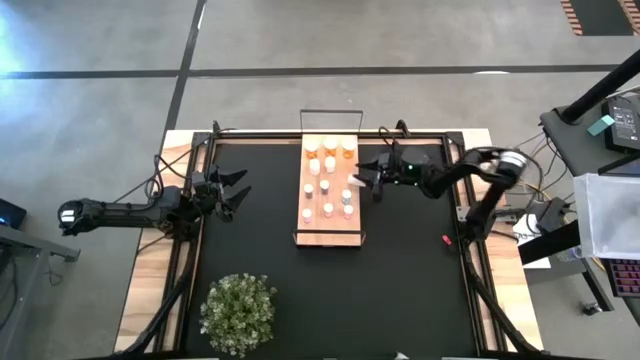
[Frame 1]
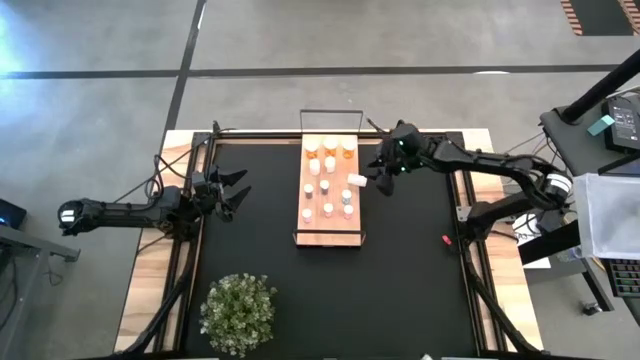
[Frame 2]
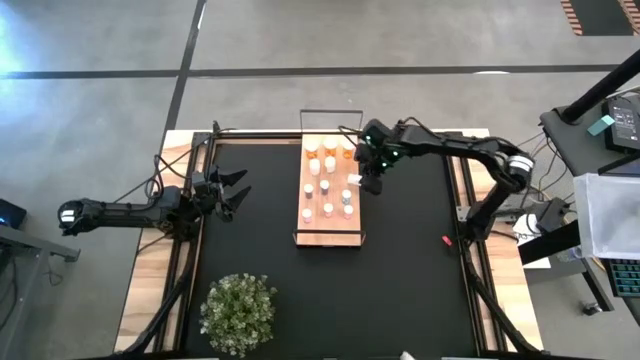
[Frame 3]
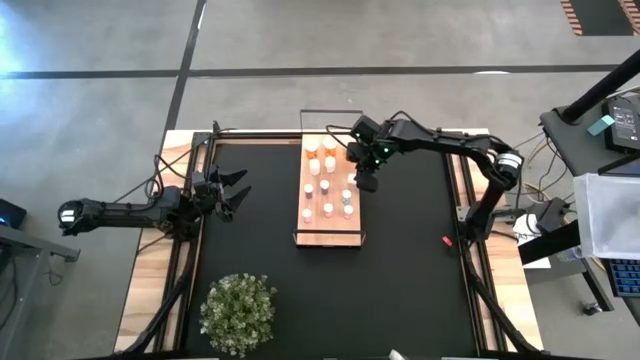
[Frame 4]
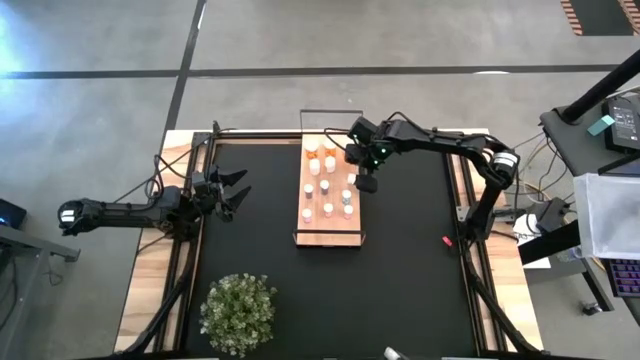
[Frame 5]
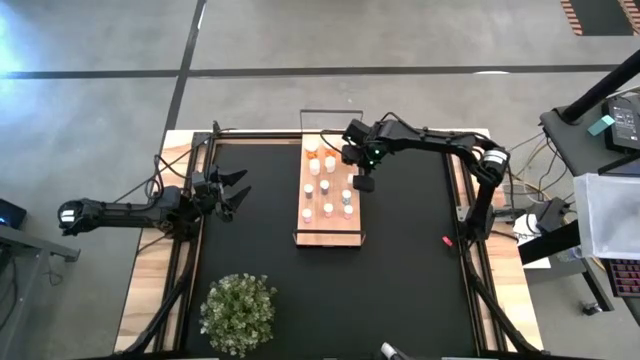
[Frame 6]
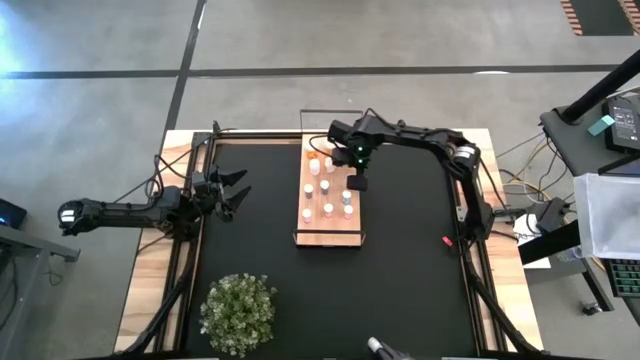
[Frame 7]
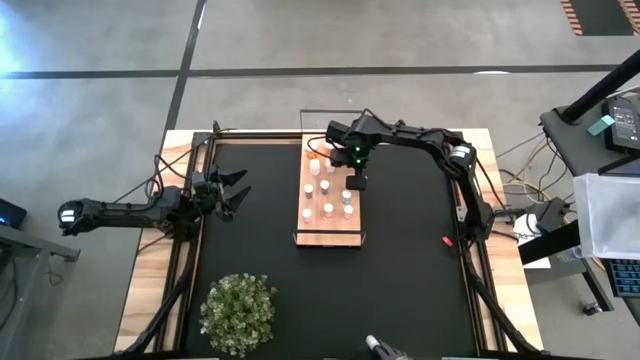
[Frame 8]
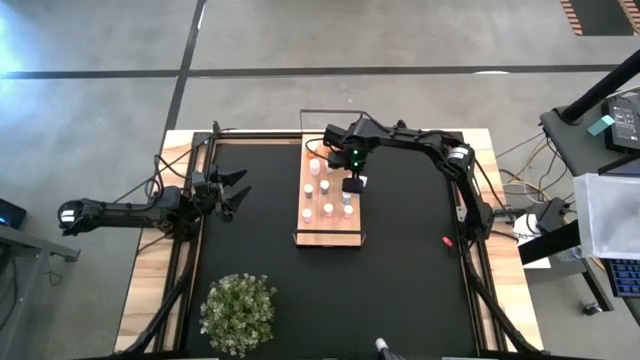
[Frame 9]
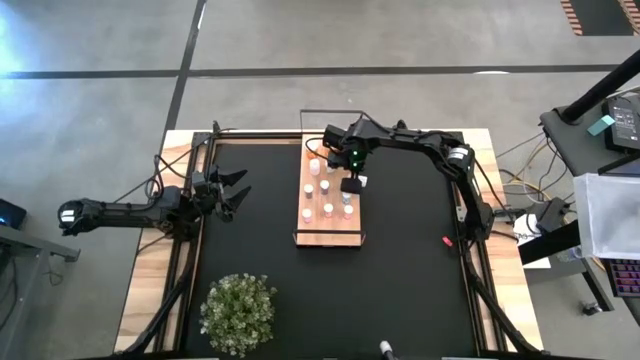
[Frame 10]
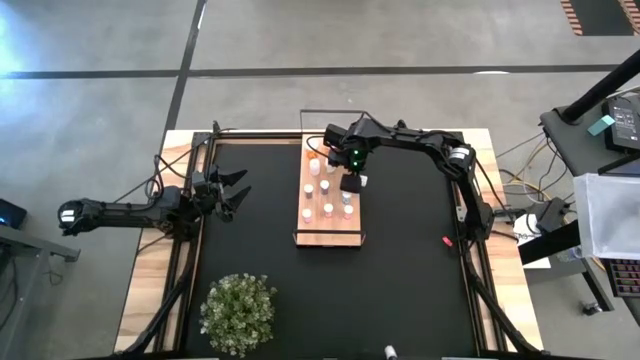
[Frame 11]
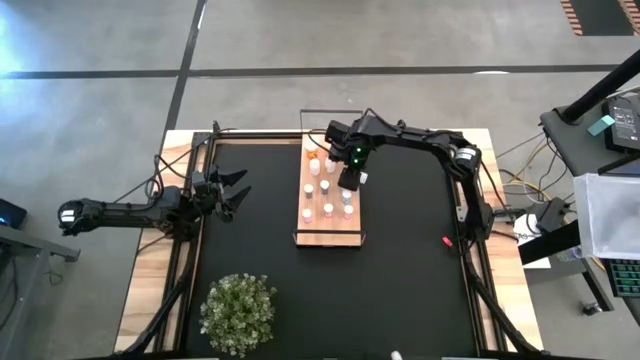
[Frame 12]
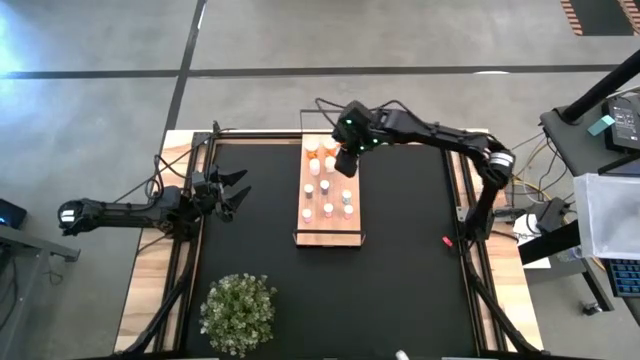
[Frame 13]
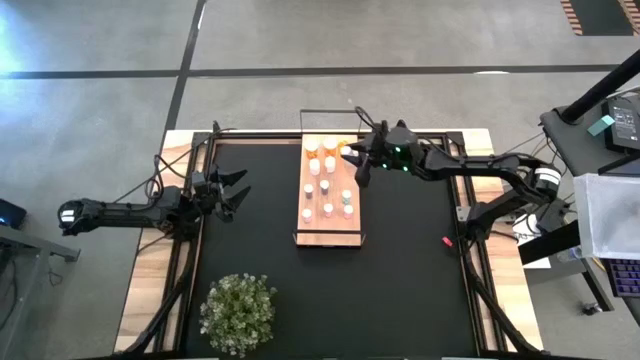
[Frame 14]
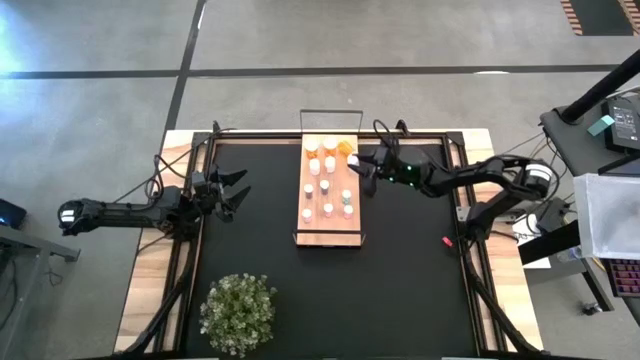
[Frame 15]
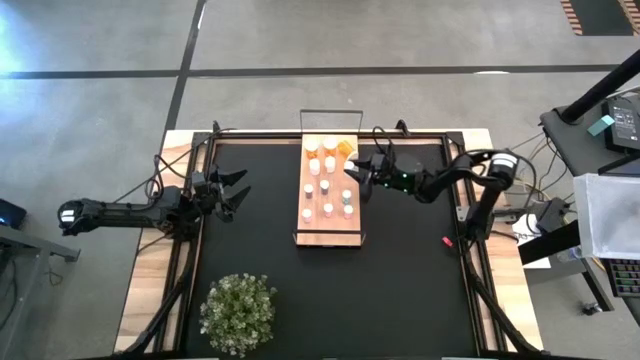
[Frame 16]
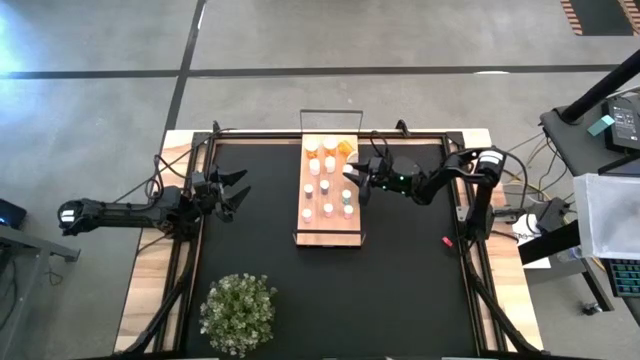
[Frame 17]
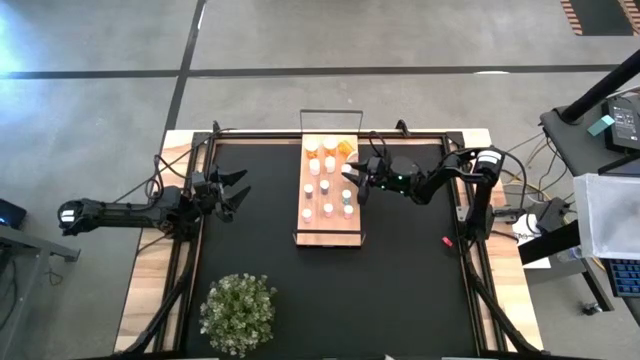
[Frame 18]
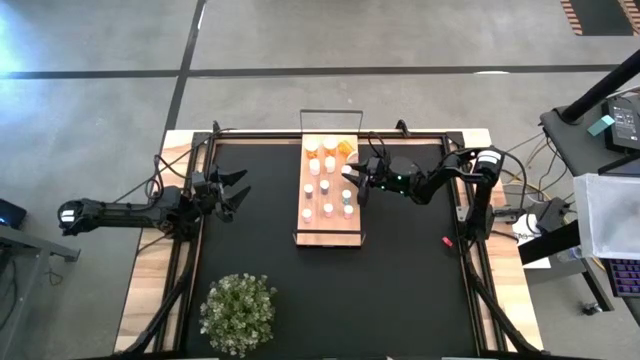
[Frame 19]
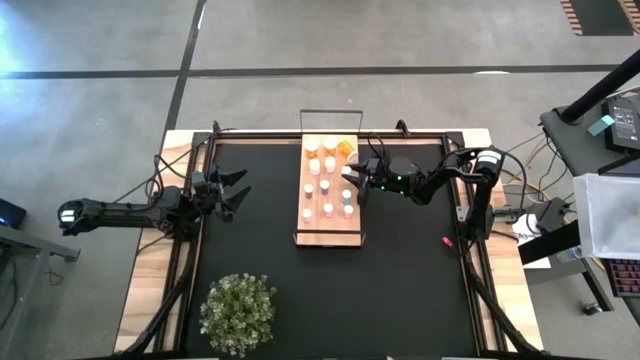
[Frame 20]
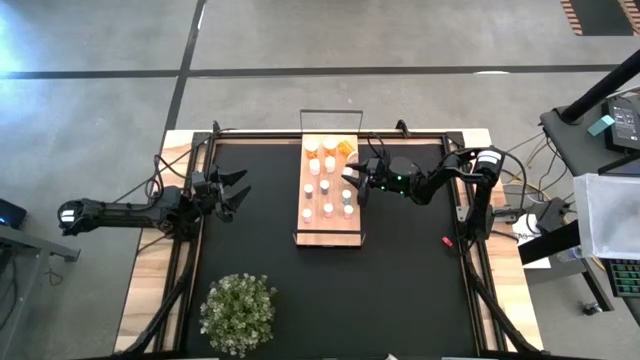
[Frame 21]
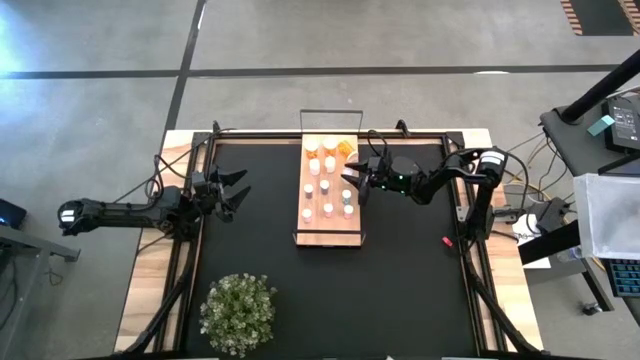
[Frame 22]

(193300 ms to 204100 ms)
Task: Pick and place medicine bottles onto shelf by color
Put the white pill bottle on the shelf aligned with the other white pill bottle

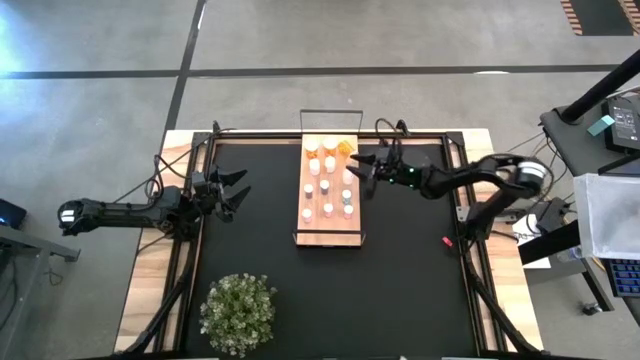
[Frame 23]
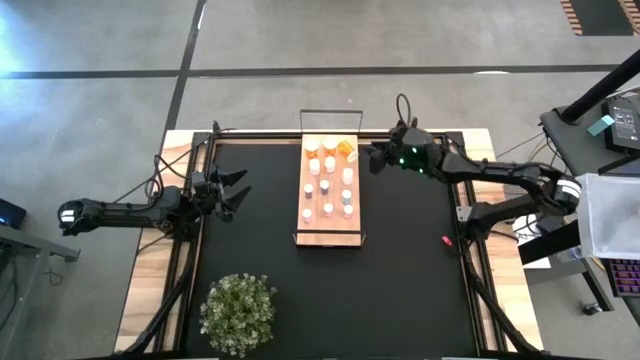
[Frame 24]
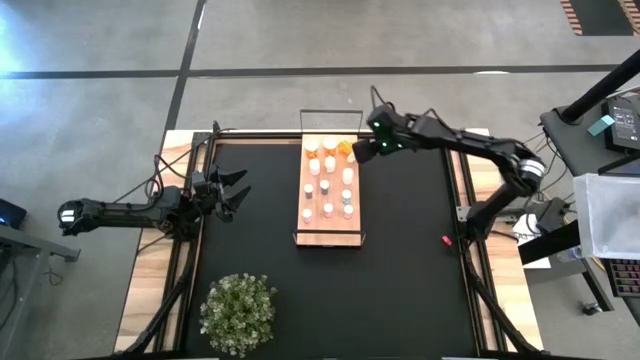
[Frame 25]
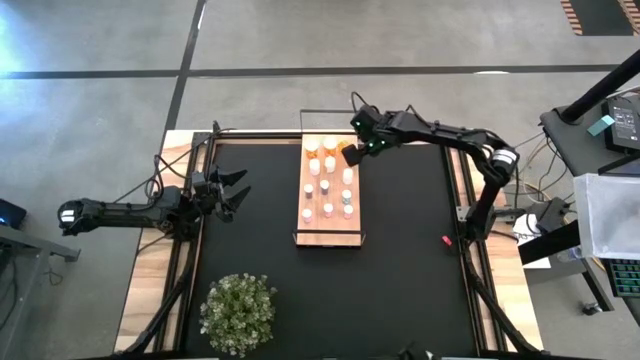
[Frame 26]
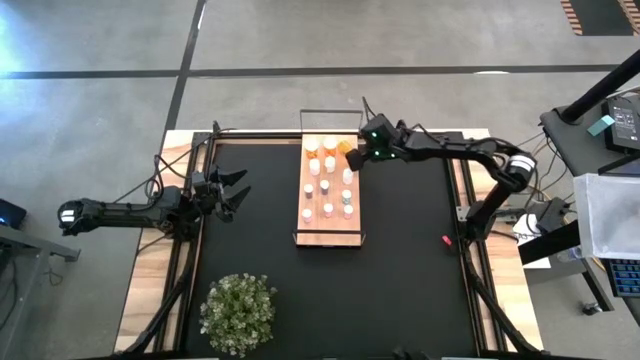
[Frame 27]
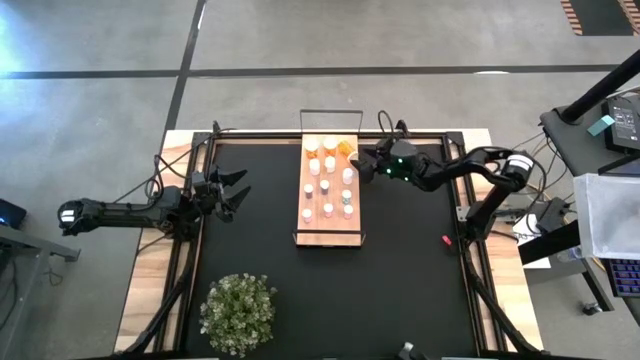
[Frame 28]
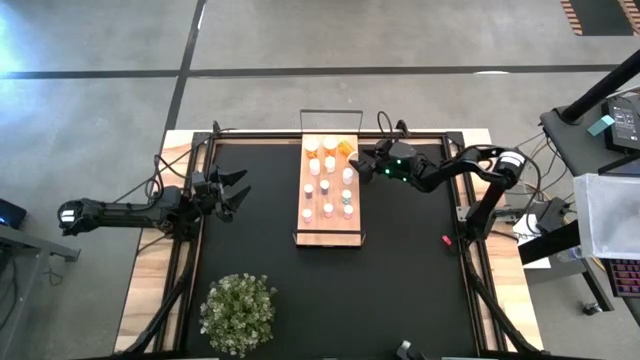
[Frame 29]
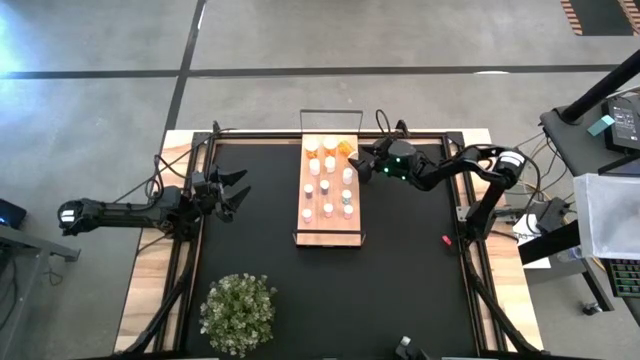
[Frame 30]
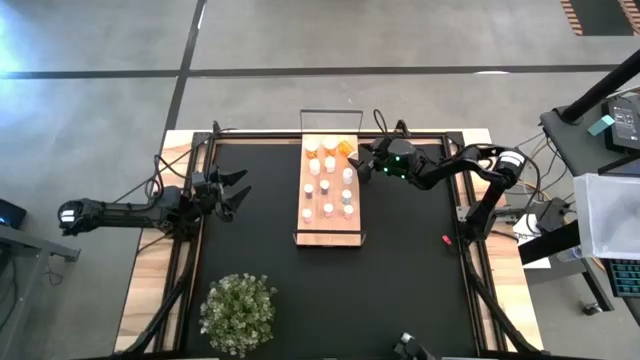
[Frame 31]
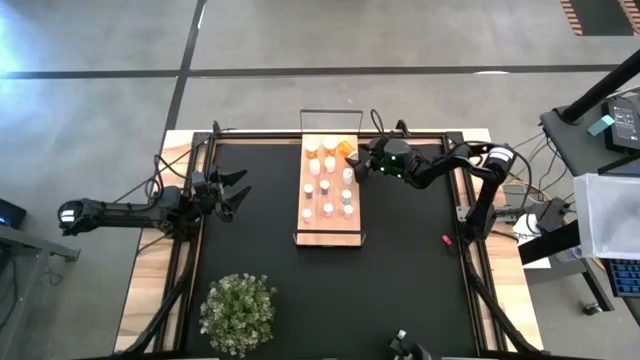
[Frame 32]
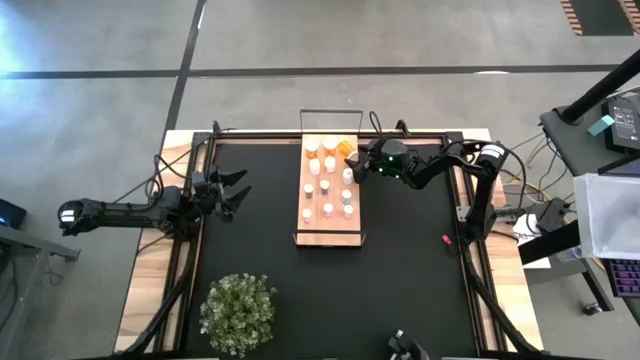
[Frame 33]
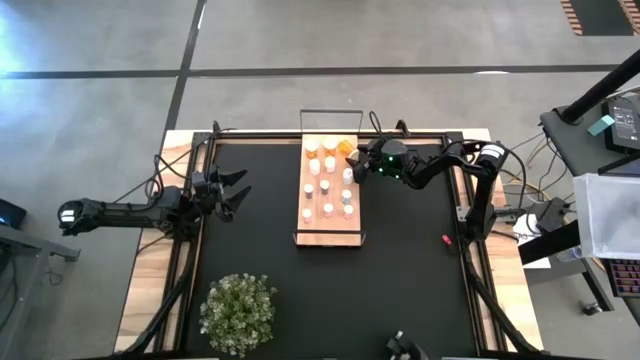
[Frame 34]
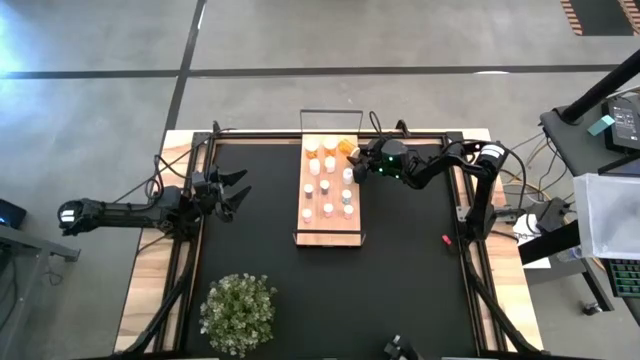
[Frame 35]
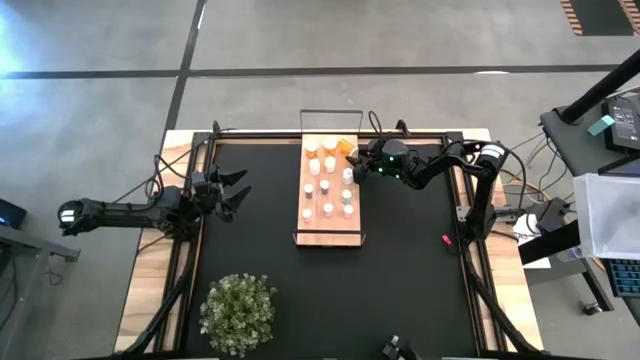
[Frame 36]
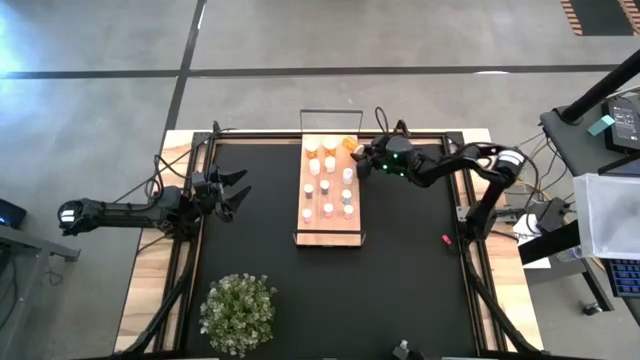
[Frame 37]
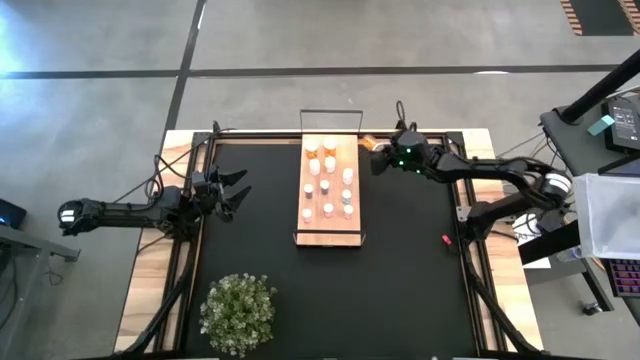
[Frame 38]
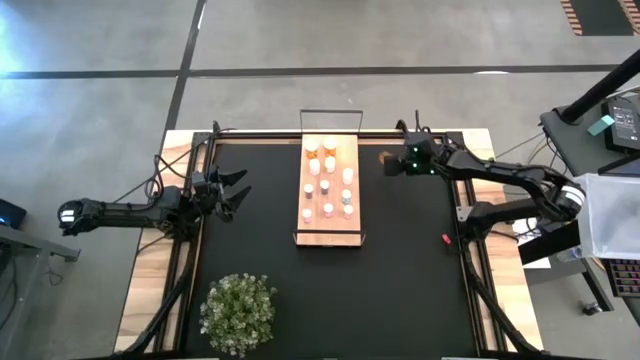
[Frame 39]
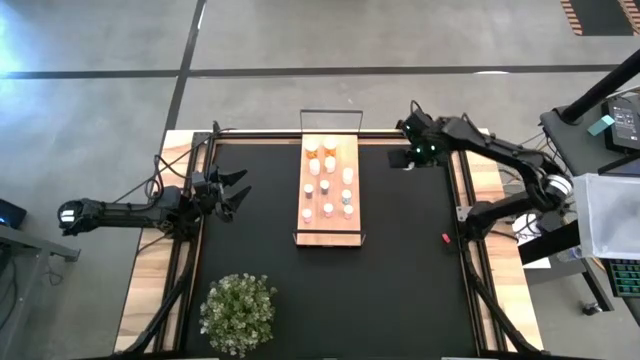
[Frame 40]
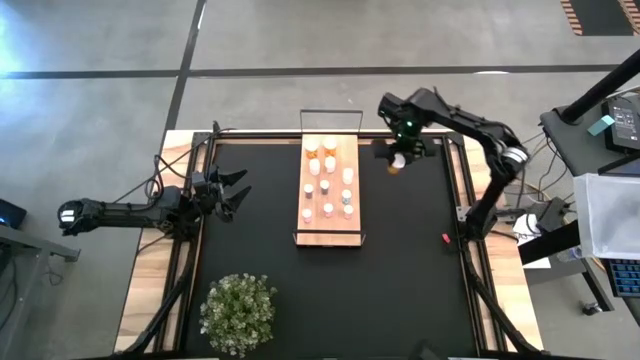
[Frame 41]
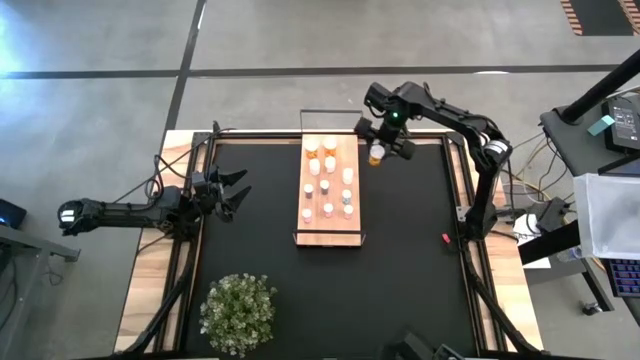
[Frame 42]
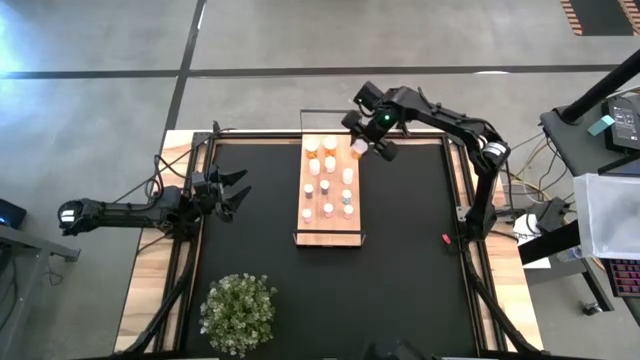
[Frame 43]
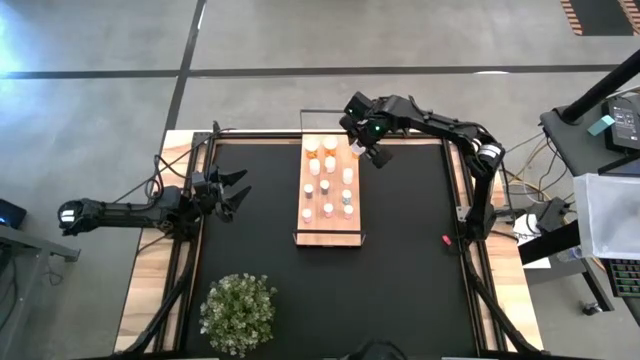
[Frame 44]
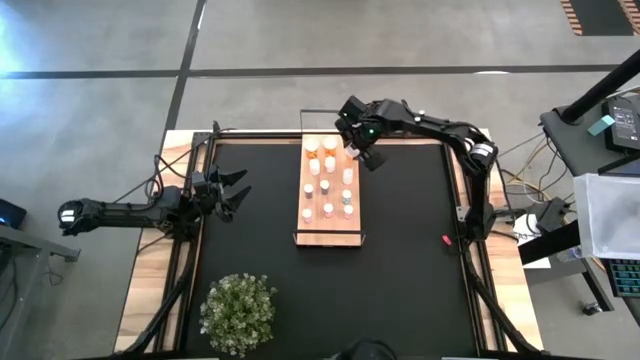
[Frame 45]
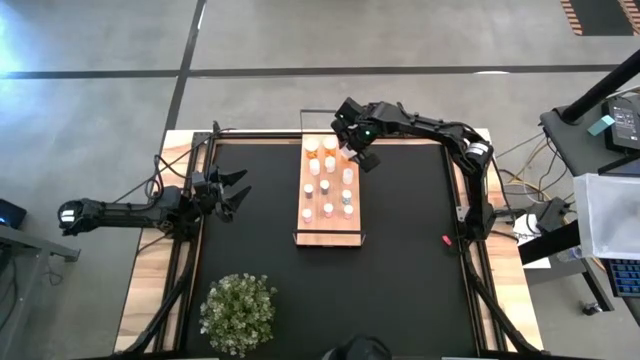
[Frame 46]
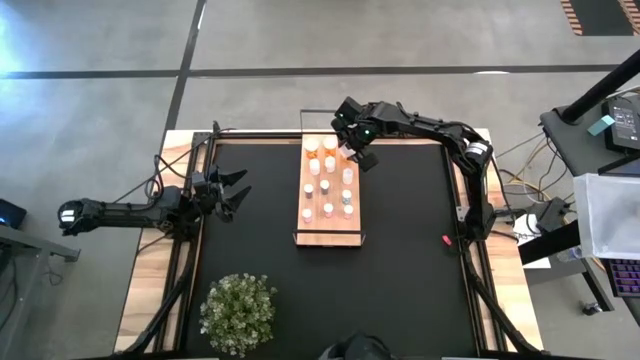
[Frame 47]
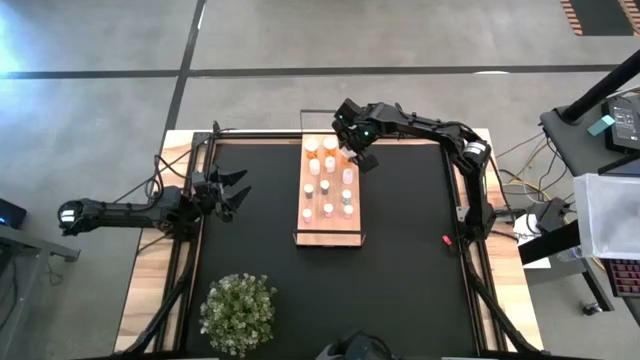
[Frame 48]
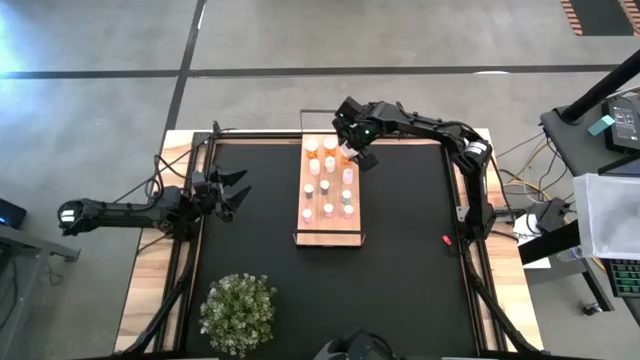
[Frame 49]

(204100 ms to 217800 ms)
Adjust the orange pill bottle on the shelf
